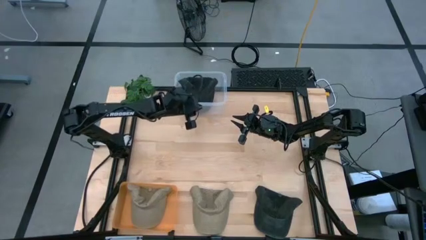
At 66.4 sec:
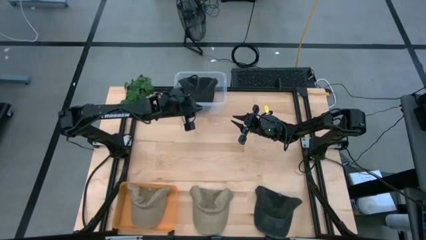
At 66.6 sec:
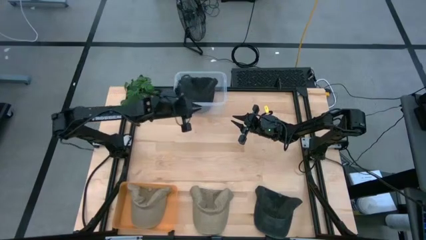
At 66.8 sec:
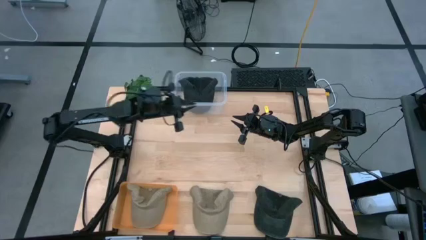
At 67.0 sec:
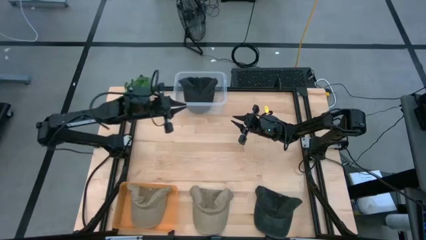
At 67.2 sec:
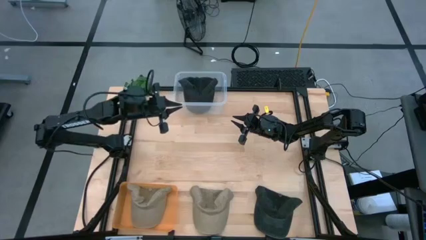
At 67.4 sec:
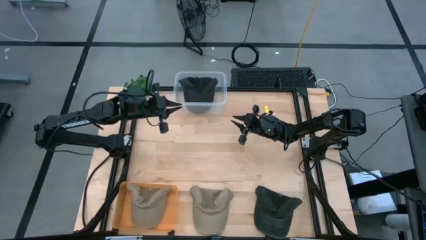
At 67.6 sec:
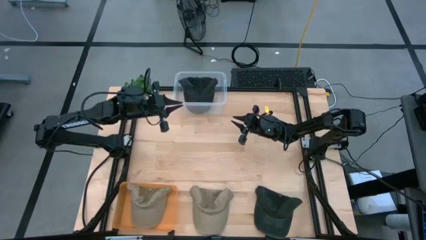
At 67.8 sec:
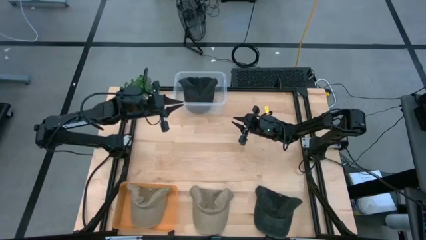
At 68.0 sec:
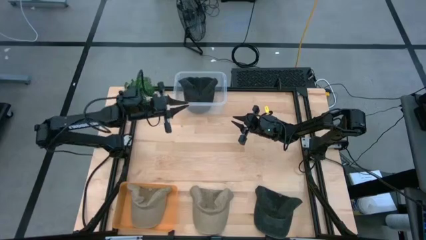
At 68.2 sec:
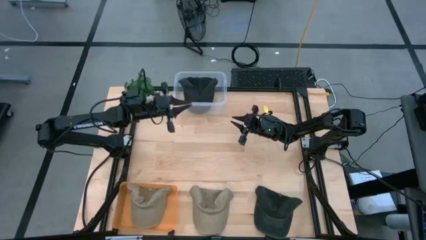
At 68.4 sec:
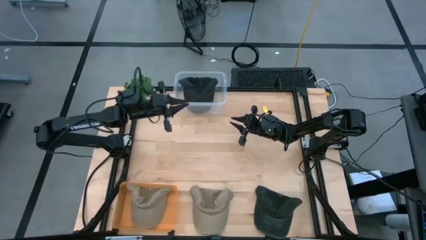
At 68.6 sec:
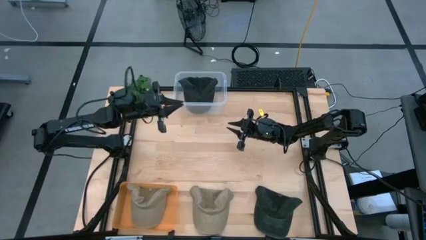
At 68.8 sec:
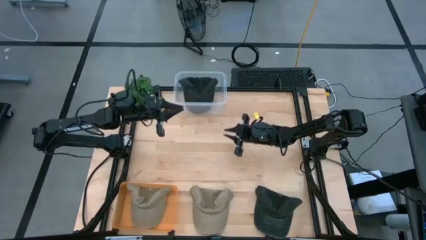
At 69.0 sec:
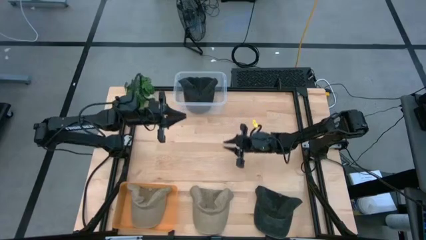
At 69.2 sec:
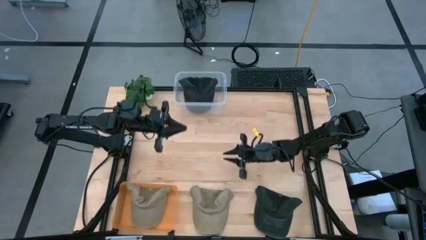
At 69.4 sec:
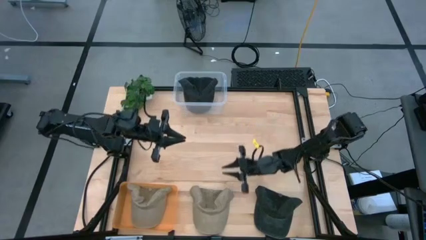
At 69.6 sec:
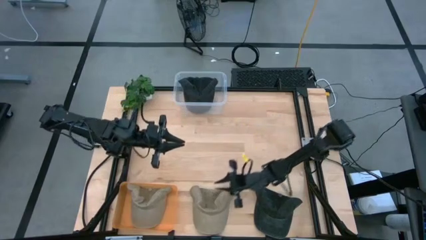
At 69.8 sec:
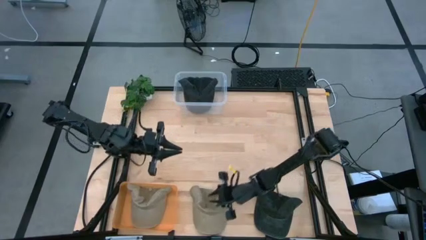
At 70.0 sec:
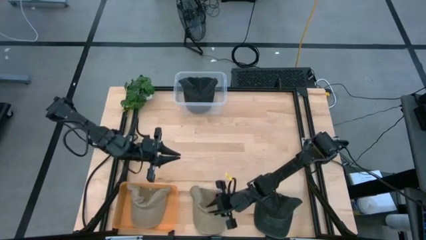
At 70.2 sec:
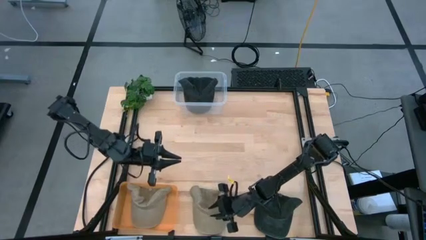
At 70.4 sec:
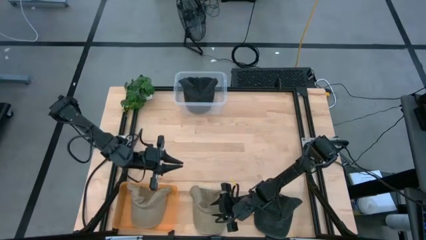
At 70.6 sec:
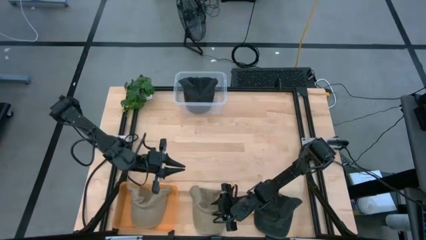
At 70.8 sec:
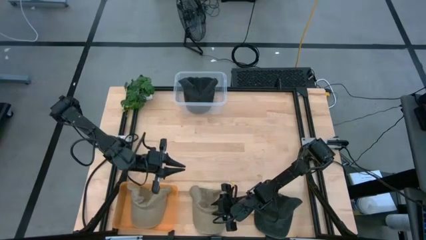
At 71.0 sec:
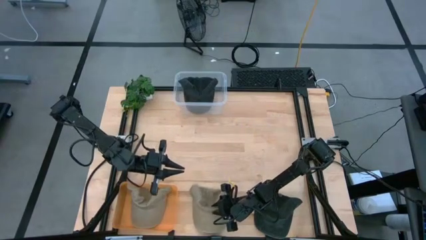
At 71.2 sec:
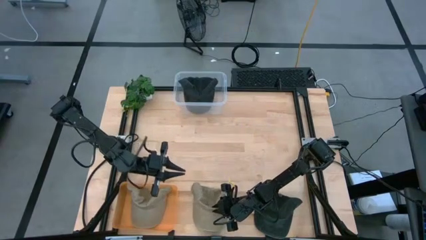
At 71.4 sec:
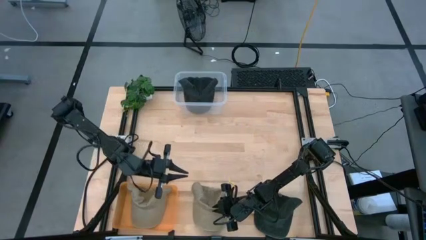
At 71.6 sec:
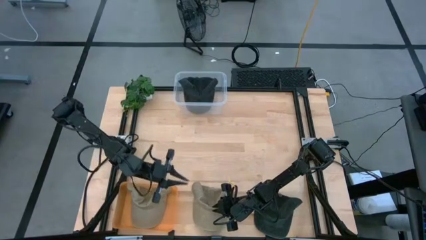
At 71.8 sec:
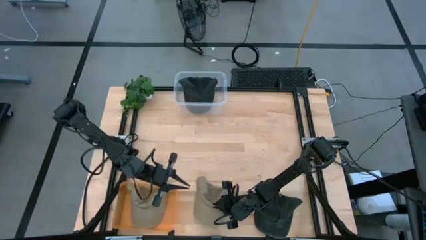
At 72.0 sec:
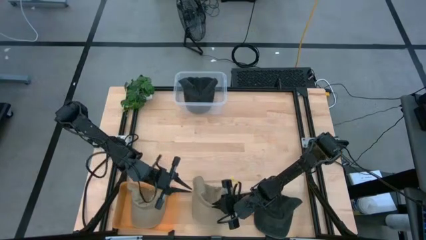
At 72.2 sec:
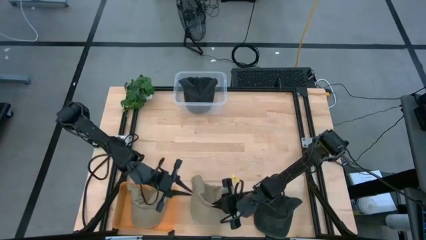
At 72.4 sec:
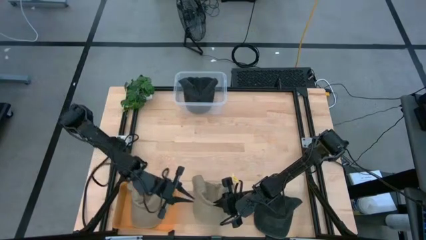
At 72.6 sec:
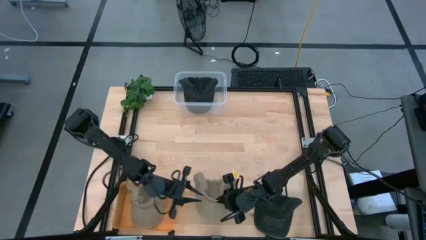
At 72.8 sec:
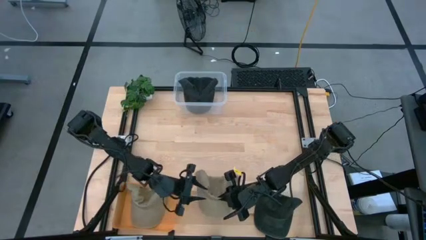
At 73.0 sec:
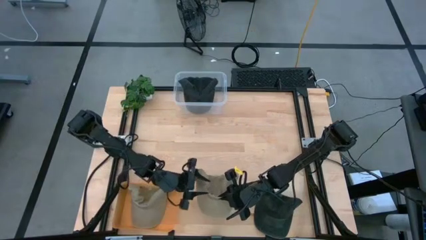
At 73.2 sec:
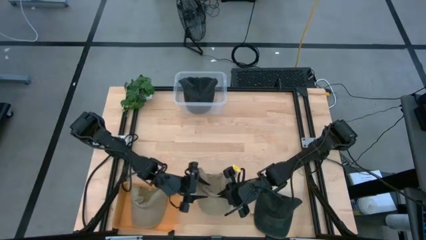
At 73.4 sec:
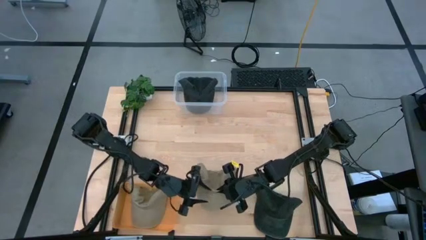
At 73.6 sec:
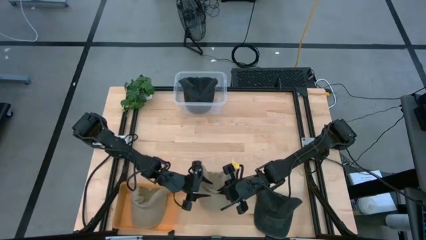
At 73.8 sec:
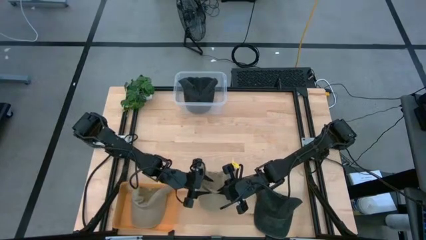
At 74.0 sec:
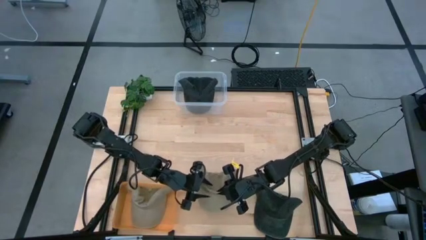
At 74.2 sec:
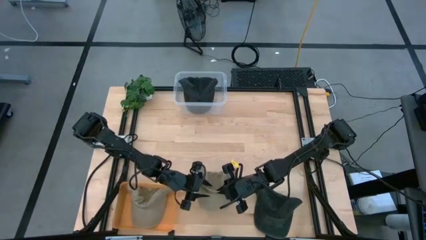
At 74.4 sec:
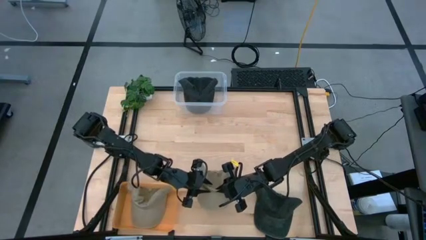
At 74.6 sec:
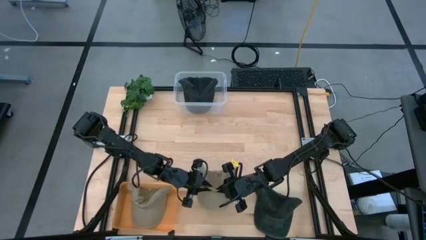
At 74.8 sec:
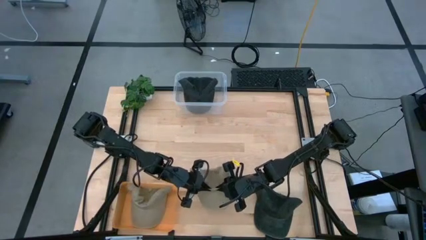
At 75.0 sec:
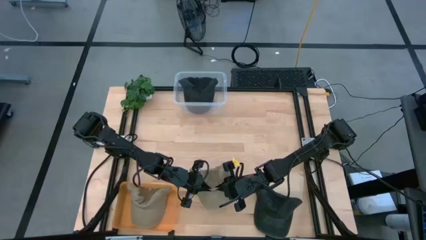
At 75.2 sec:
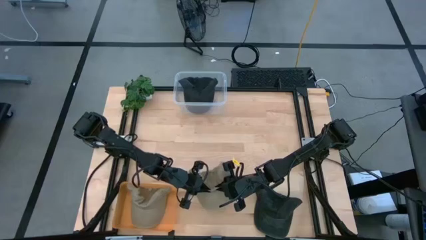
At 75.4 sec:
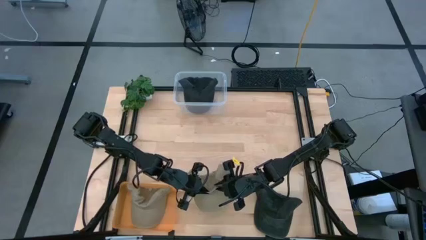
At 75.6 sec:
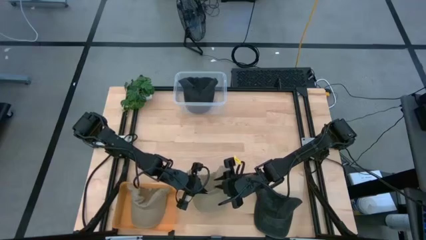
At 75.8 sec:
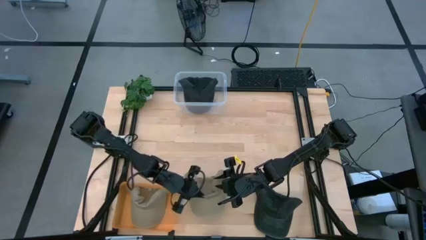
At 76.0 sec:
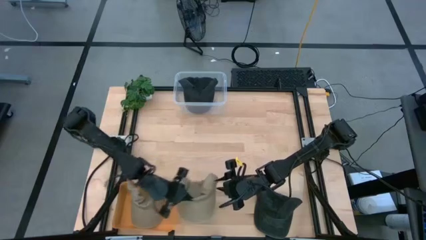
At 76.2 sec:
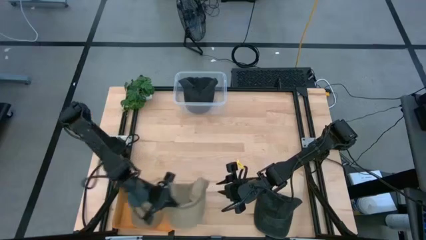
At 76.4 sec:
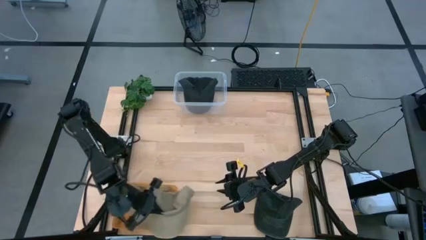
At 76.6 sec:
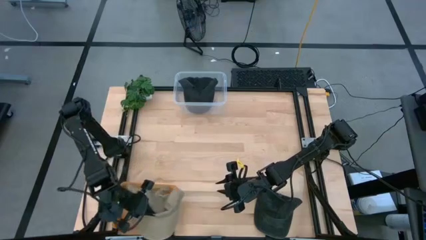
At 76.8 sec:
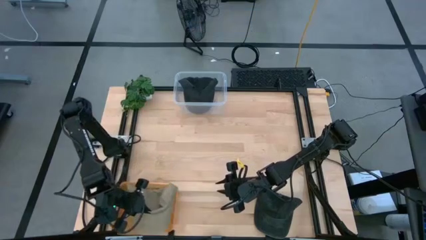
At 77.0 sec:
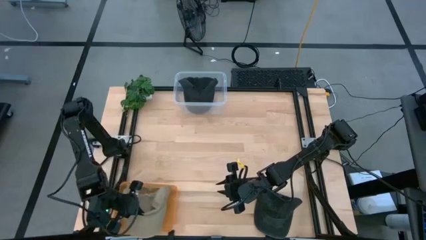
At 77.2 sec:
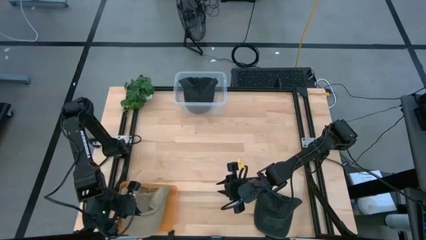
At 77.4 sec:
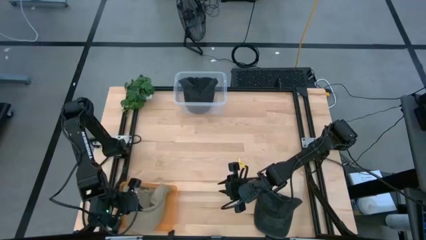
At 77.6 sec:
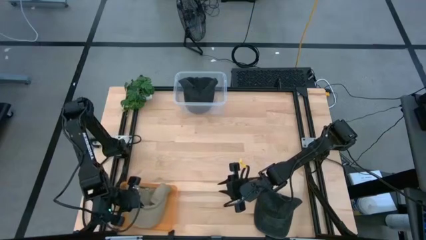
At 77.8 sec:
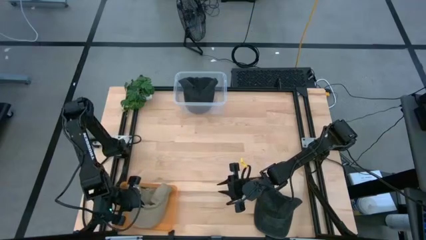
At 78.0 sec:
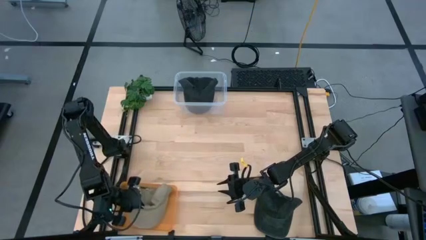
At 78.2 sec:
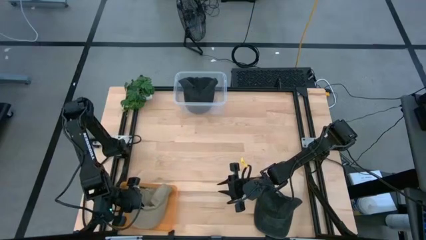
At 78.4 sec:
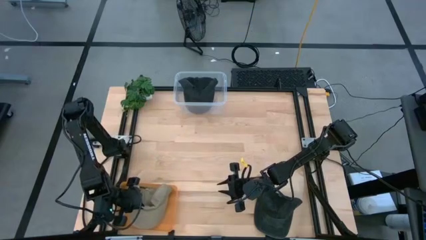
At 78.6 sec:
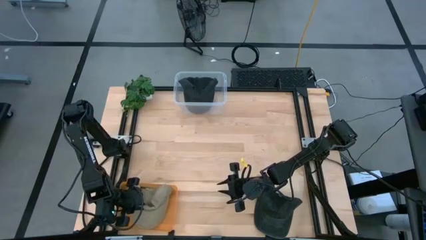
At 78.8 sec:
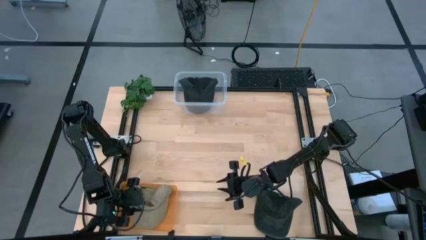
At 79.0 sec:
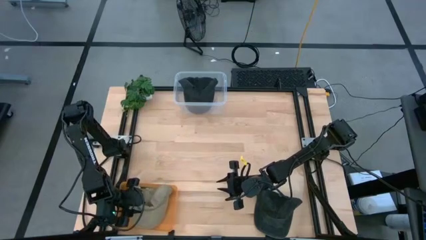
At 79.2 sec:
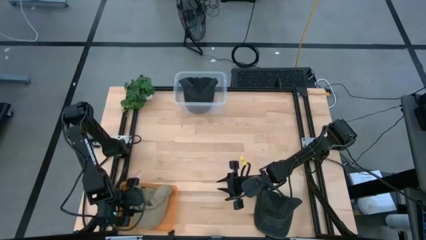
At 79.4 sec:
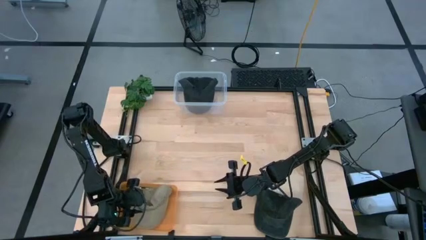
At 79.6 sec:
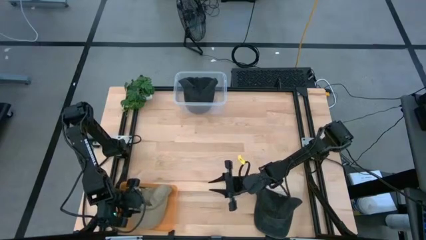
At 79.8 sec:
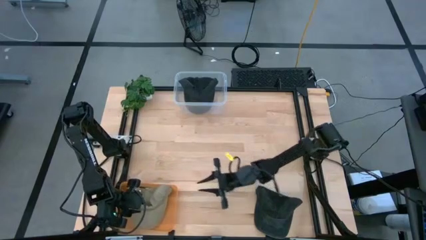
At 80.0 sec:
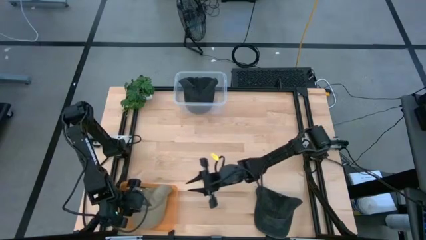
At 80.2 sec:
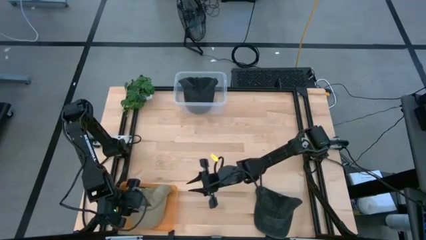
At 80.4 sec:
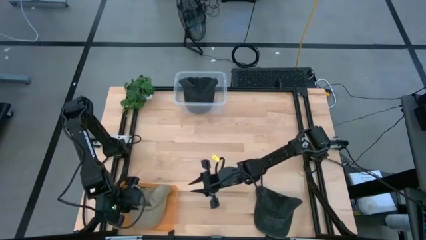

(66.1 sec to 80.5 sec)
Task: Pick & Place hat
Put the brown cap into the orange bin
